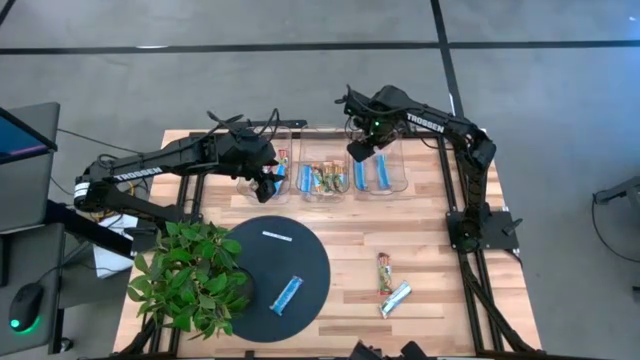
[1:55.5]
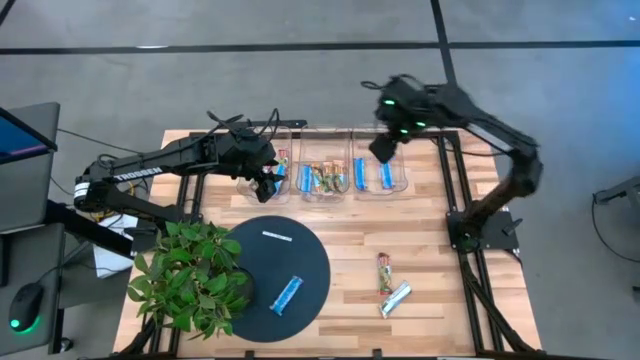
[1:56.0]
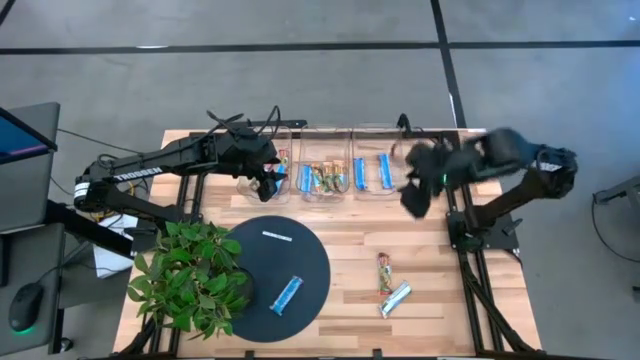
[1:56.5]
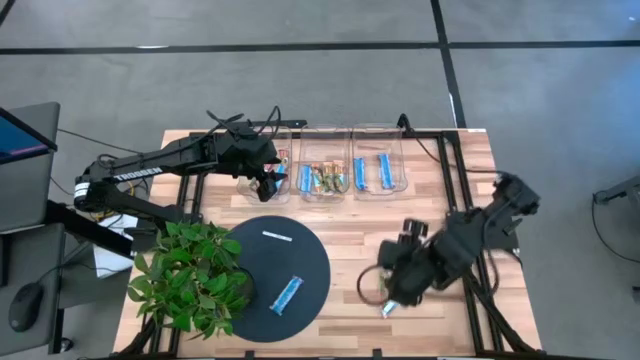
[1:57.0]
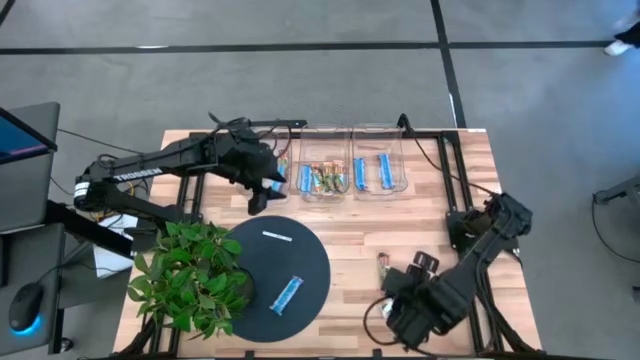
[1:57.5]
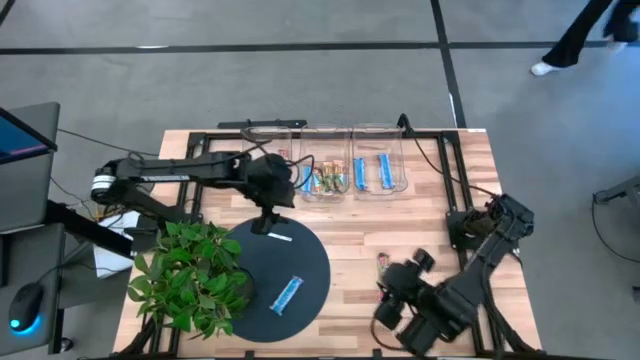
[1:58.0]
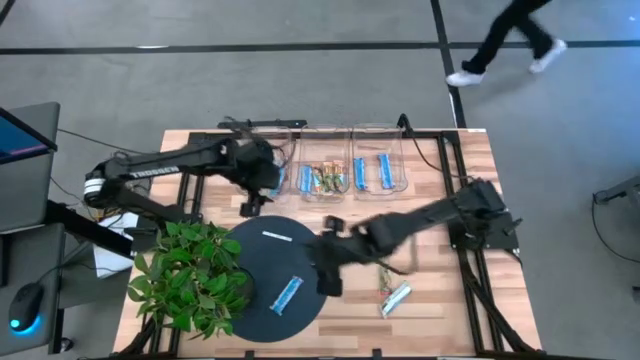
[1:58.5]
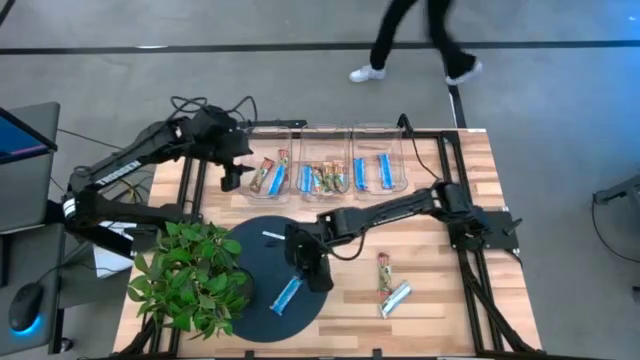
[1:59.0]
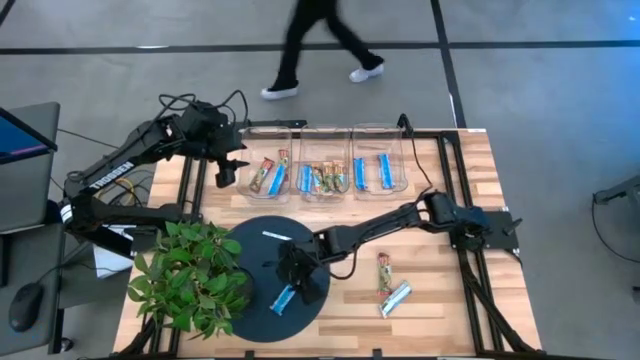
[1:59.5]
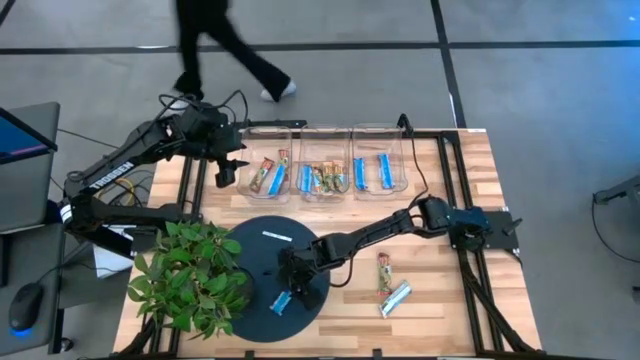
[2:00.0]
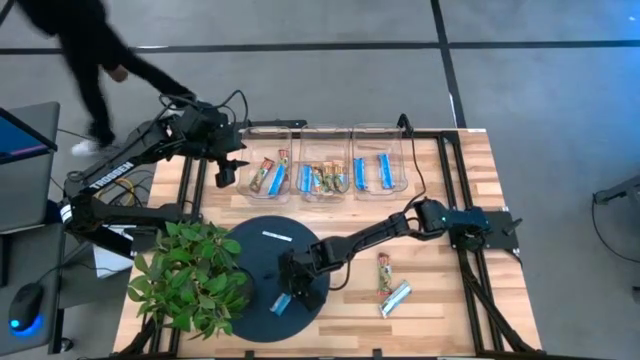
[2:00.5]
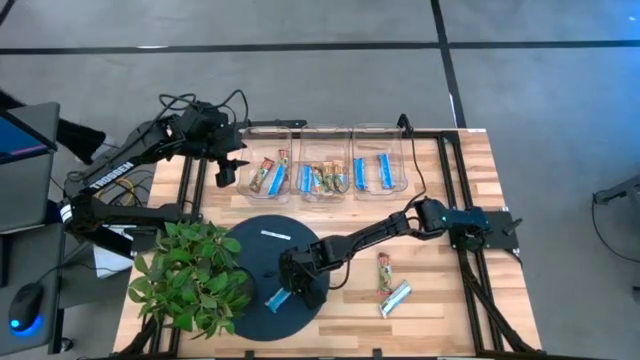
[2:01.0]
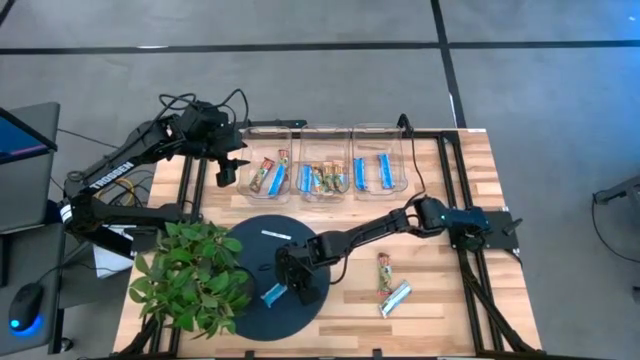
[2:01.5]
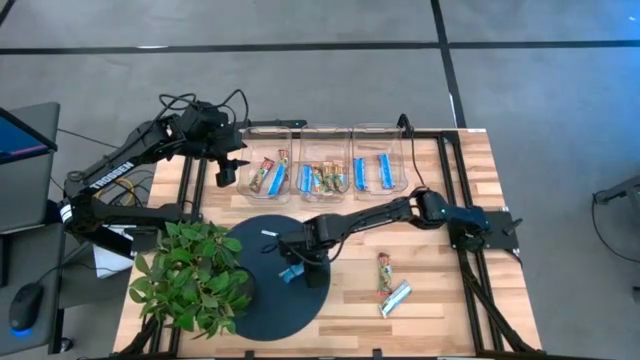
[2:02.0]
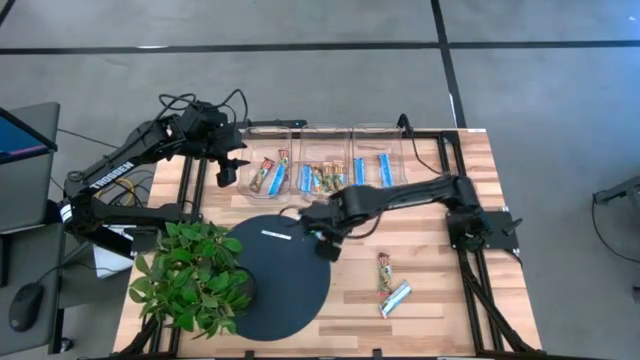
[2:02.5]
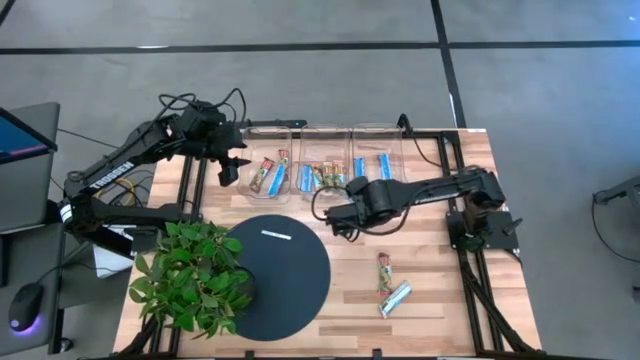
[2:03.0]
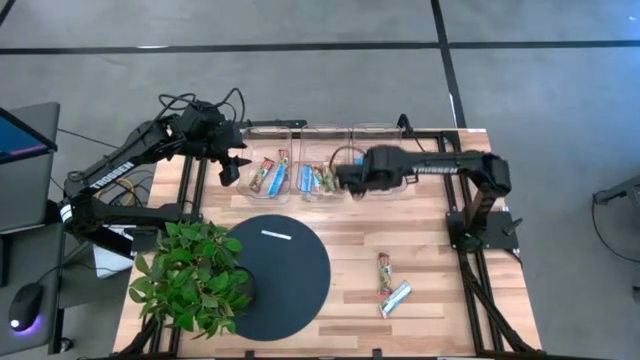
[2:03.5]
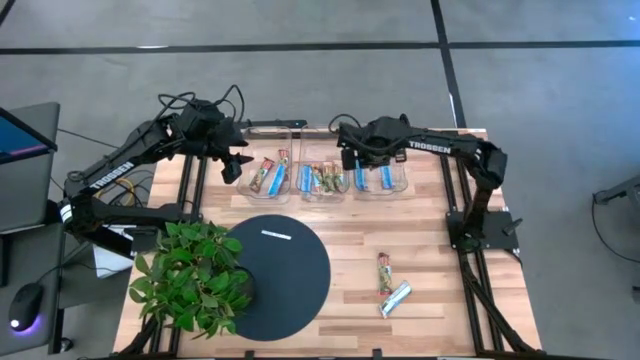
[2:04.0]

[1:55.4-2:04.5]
Task: Pick and place Granola Bars by type
Put the blue granola bar into the right transparent bin

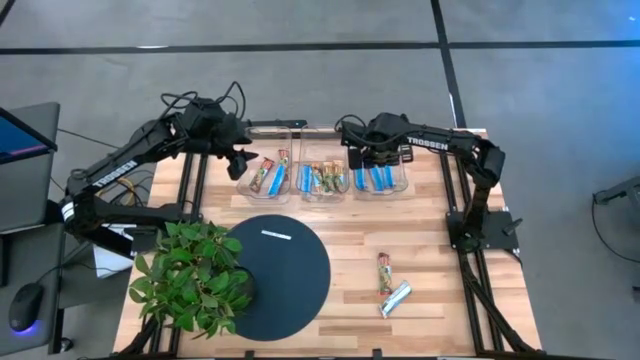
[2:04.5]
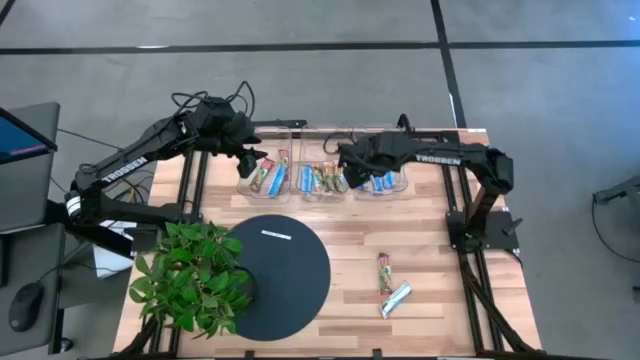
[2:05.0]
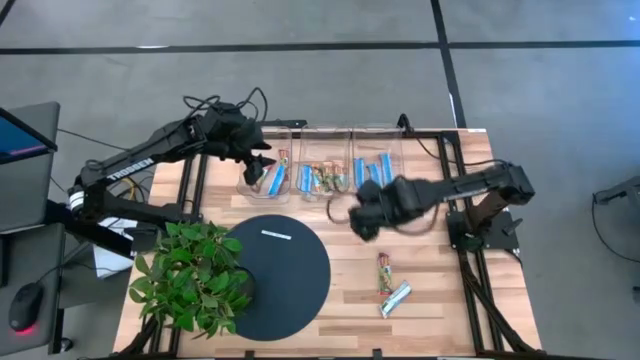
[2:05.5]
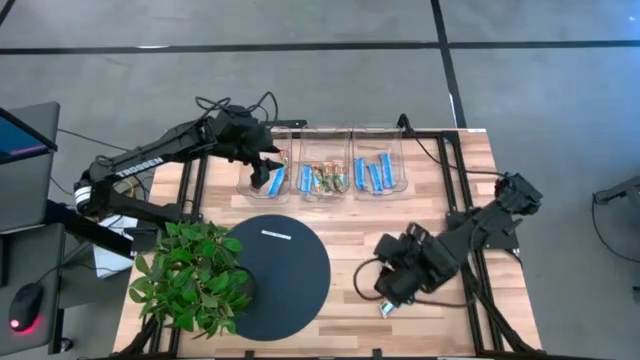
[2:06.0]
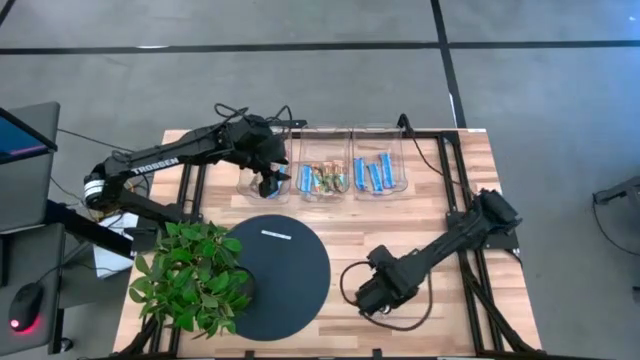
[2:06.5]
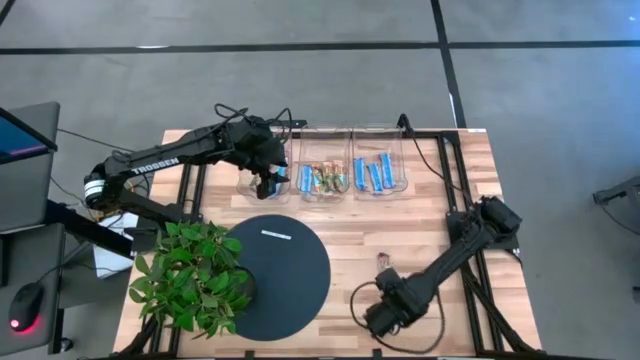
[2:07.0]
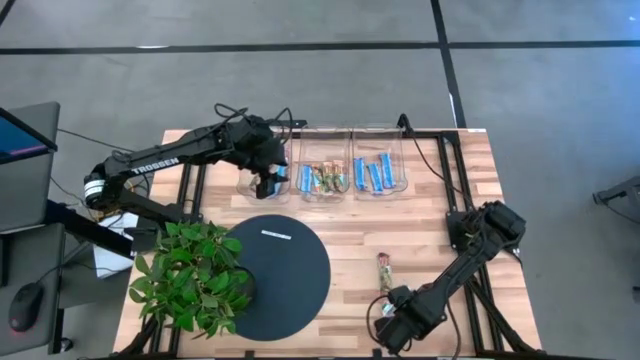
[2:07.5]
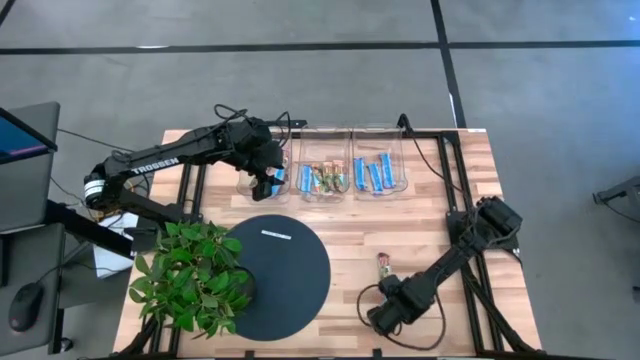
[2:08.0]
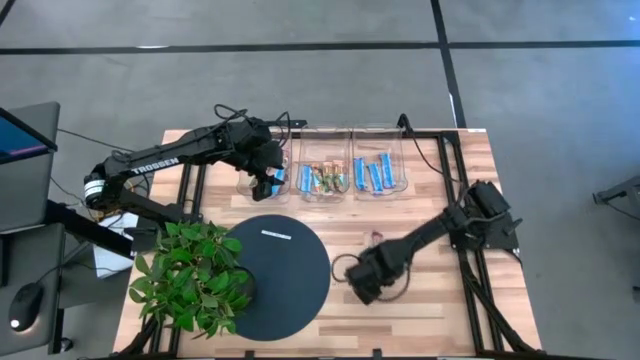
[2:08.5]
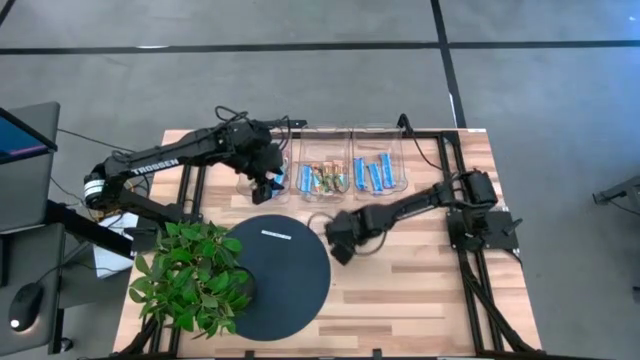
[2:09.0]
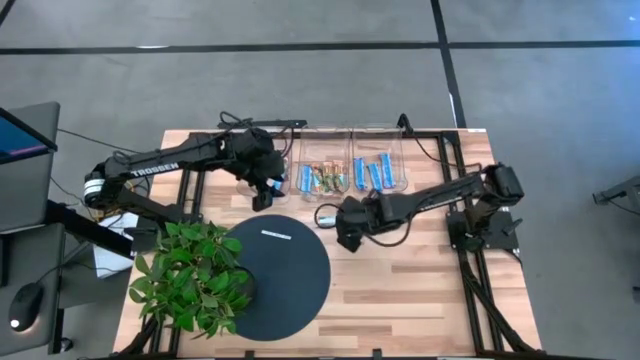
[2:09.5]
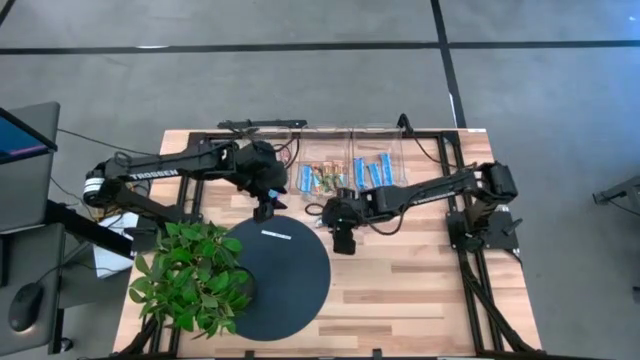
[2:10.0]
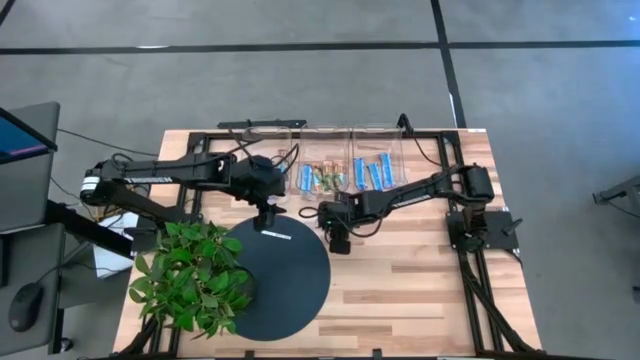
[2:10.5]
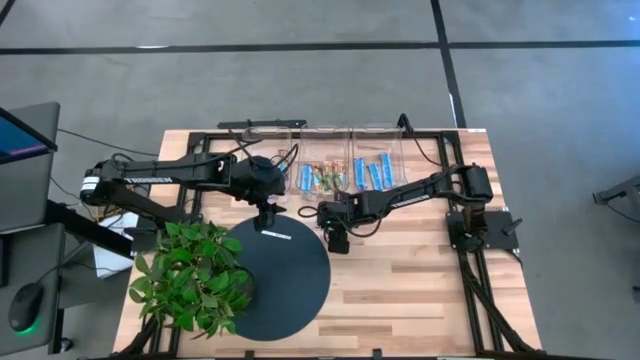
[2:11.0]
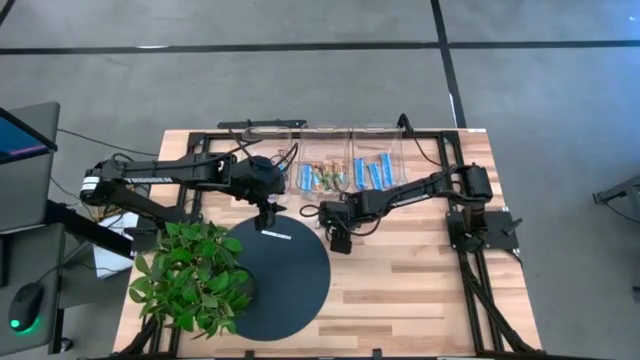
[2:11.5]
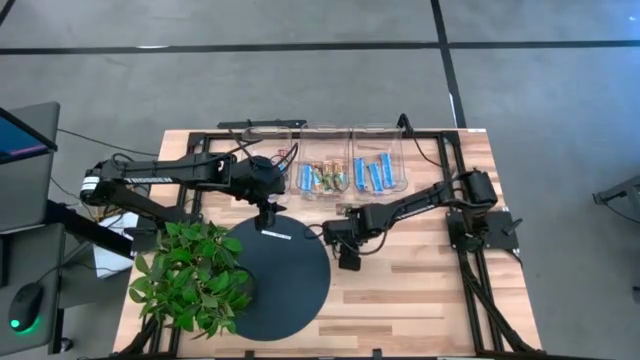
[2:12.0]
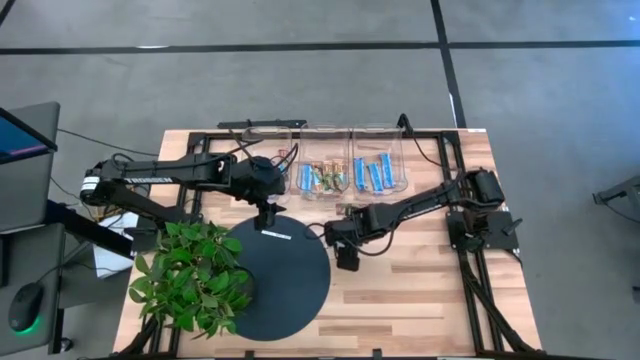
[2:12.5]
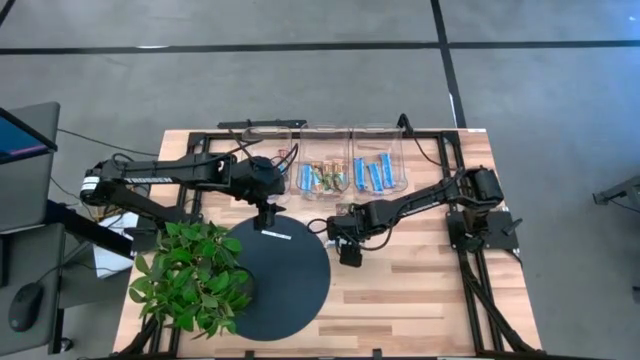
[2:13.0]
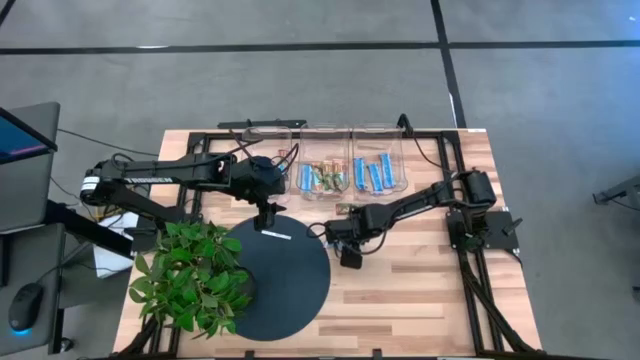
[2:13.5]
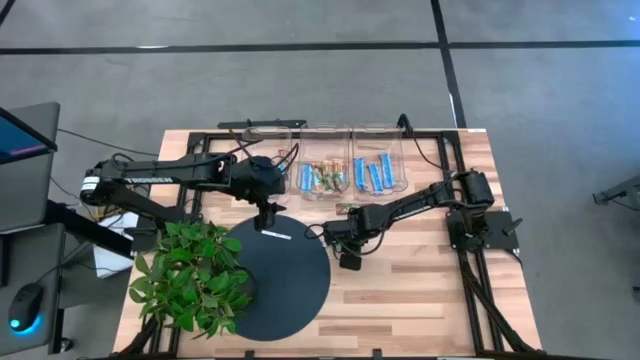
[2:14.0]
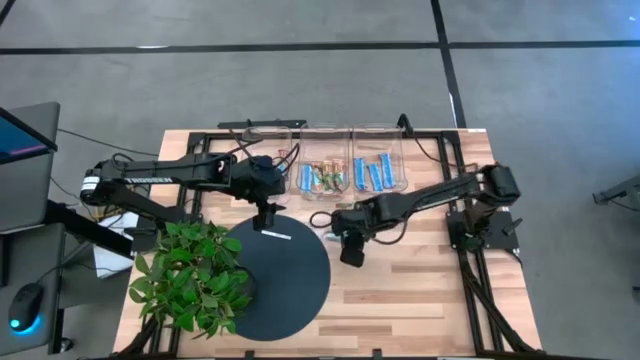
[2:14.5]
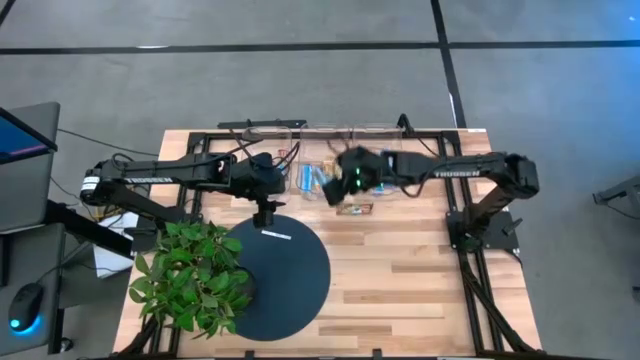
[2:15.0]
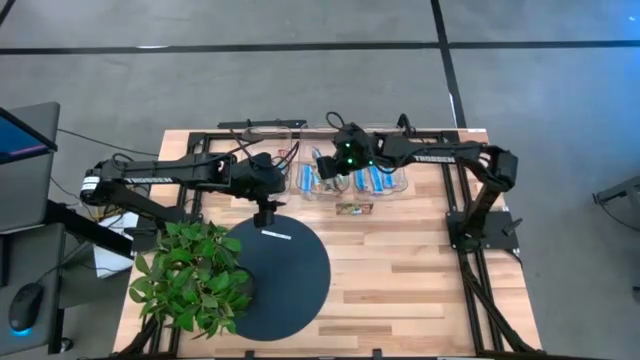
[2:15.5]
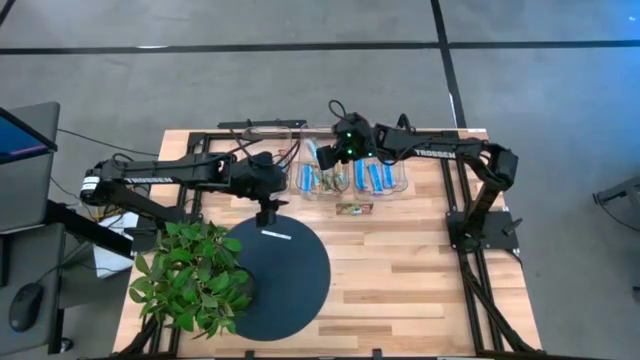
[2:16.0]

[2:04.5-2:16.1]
Put the yellow granola bar into the middle transparent bin
